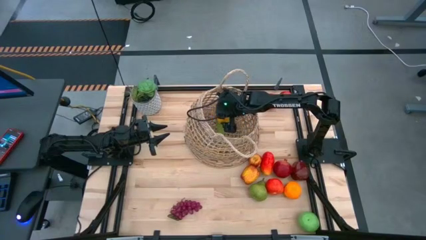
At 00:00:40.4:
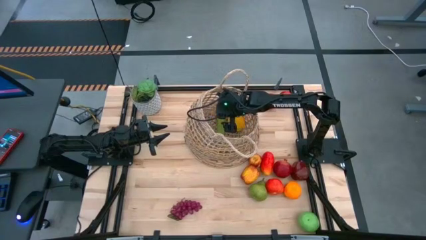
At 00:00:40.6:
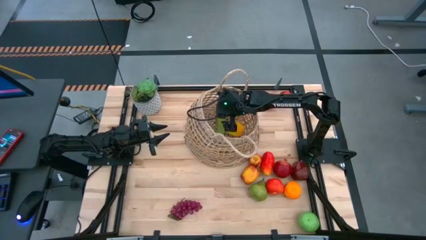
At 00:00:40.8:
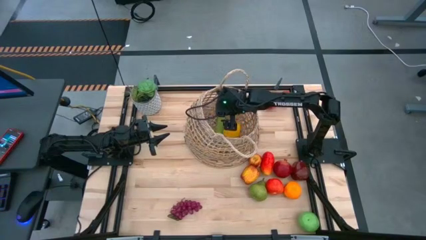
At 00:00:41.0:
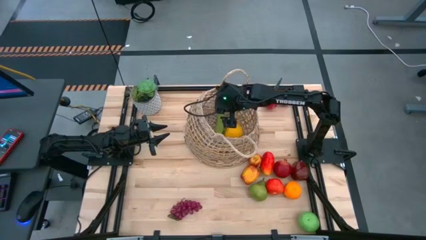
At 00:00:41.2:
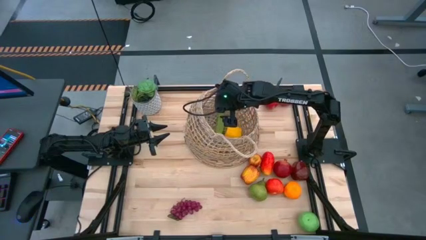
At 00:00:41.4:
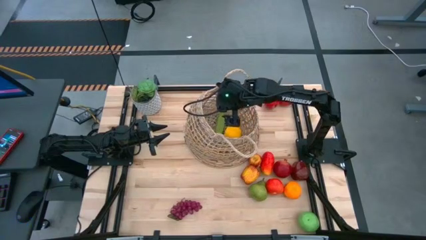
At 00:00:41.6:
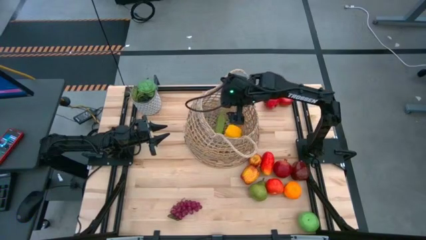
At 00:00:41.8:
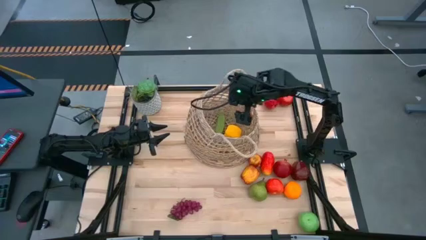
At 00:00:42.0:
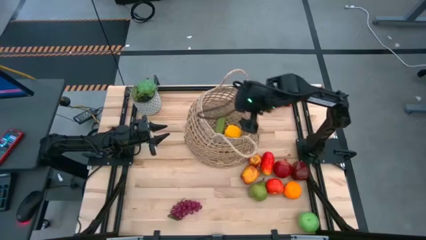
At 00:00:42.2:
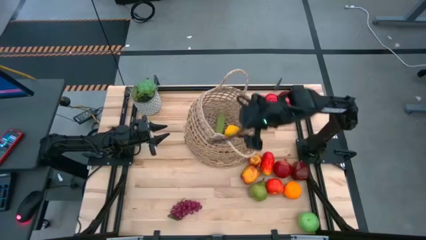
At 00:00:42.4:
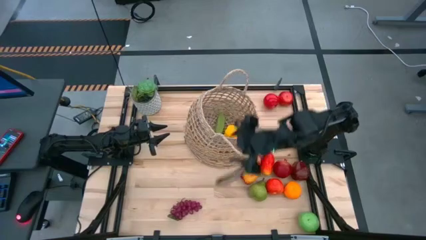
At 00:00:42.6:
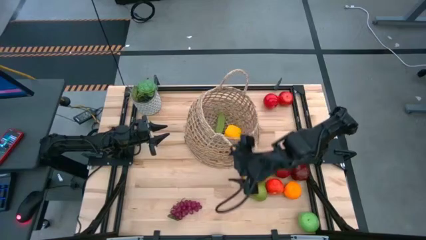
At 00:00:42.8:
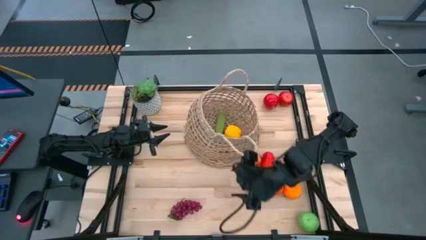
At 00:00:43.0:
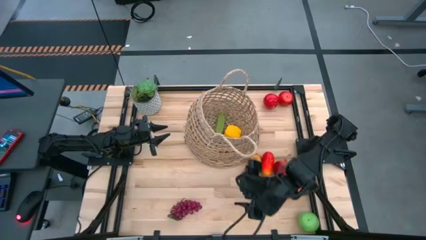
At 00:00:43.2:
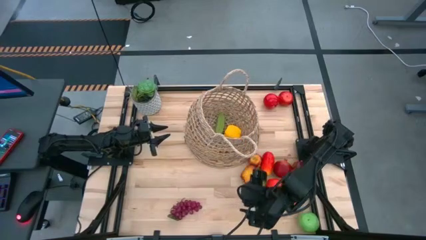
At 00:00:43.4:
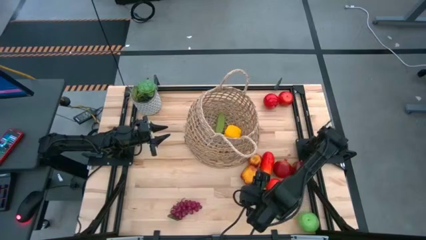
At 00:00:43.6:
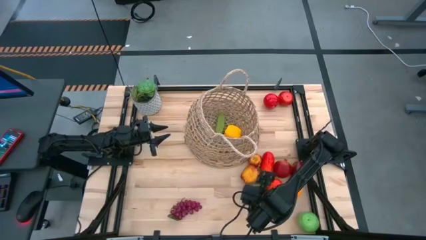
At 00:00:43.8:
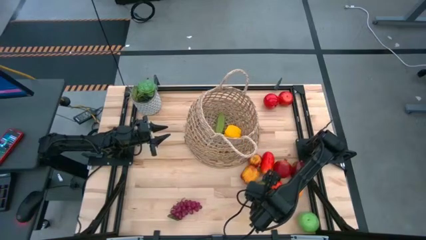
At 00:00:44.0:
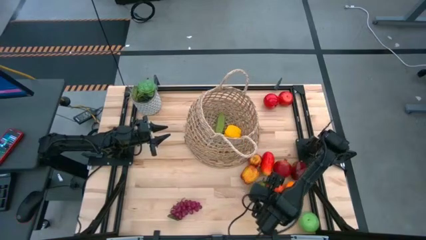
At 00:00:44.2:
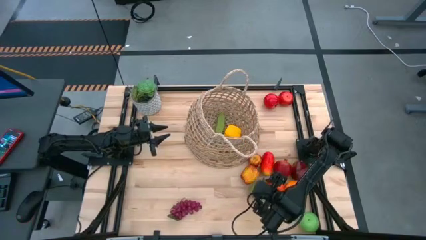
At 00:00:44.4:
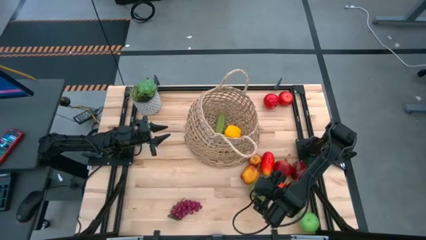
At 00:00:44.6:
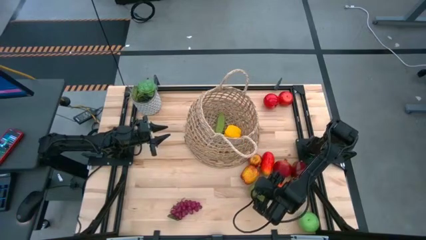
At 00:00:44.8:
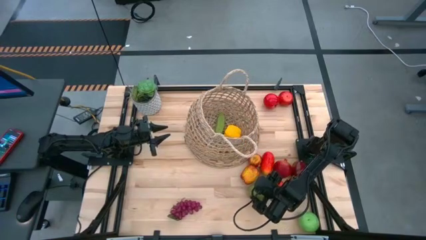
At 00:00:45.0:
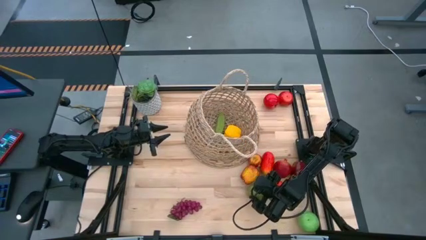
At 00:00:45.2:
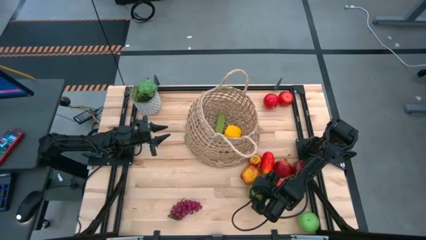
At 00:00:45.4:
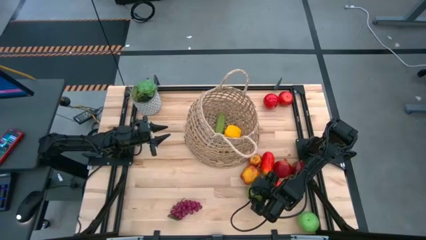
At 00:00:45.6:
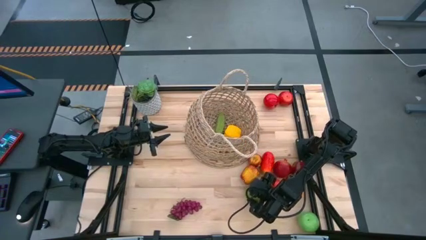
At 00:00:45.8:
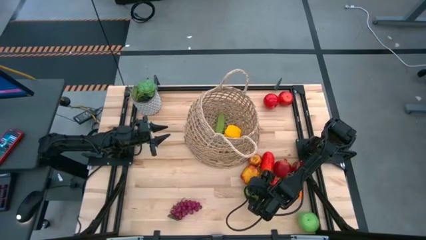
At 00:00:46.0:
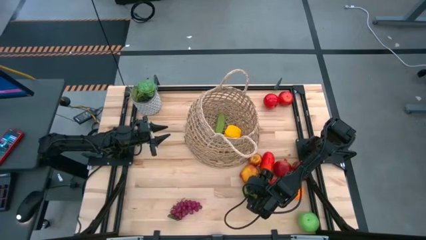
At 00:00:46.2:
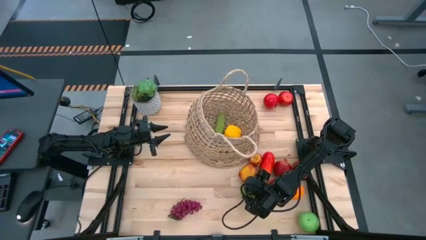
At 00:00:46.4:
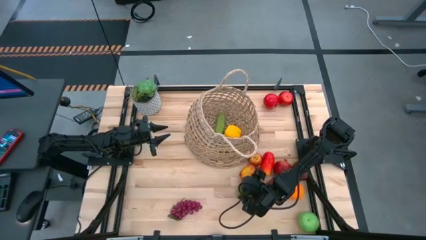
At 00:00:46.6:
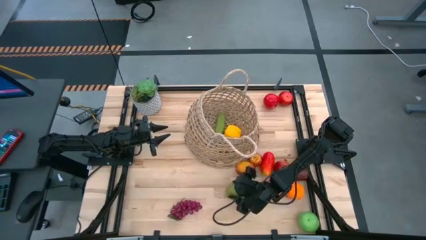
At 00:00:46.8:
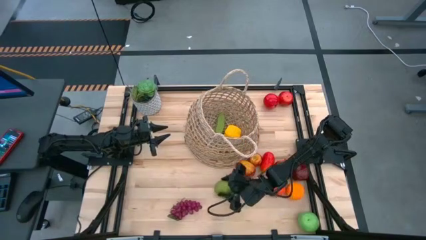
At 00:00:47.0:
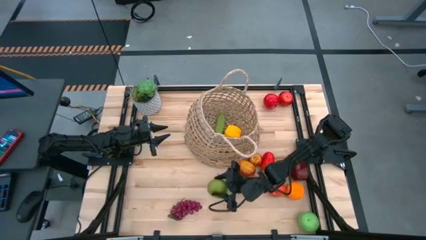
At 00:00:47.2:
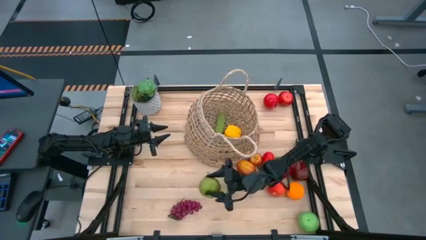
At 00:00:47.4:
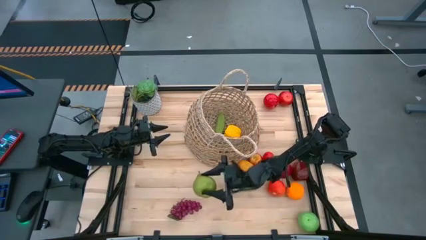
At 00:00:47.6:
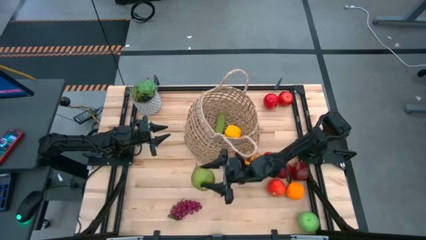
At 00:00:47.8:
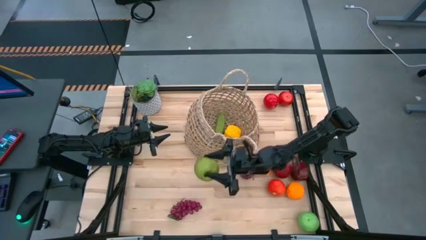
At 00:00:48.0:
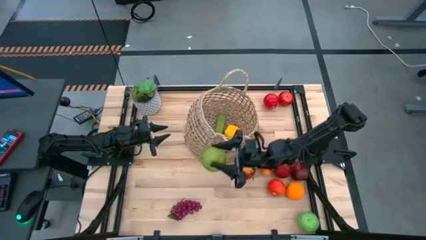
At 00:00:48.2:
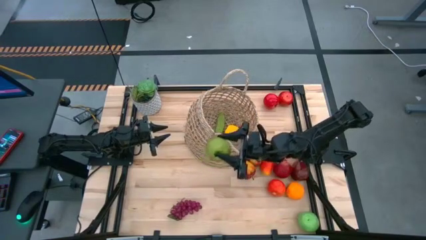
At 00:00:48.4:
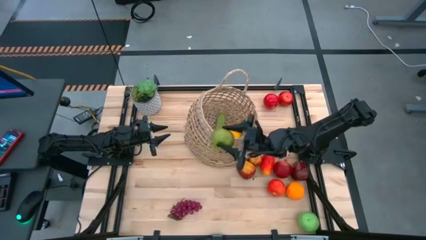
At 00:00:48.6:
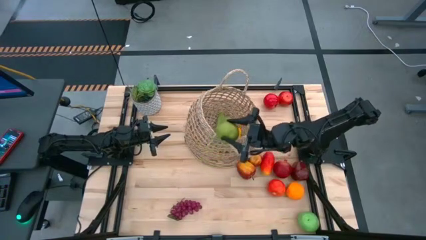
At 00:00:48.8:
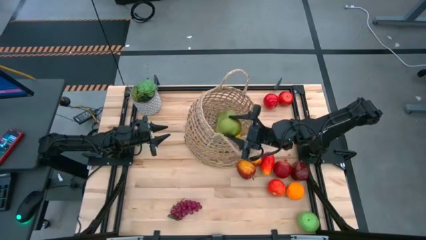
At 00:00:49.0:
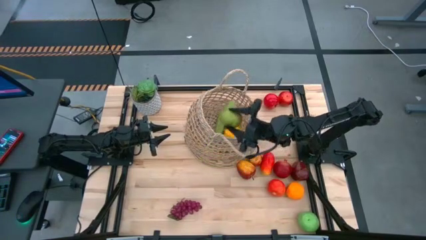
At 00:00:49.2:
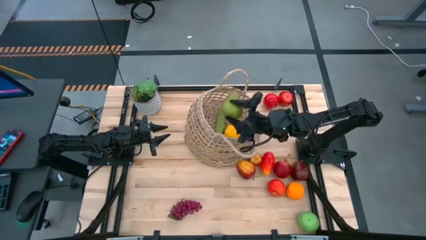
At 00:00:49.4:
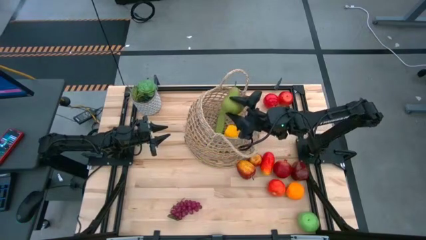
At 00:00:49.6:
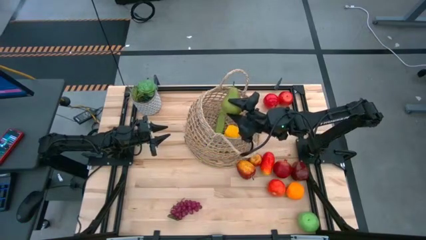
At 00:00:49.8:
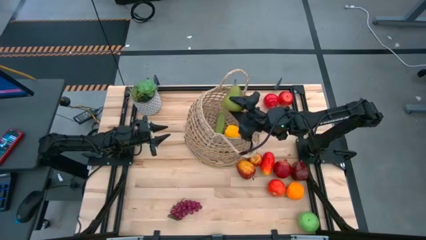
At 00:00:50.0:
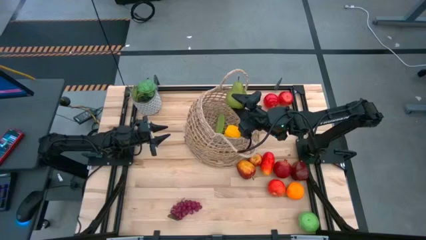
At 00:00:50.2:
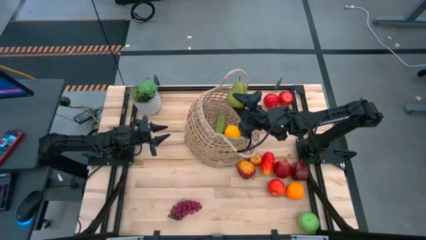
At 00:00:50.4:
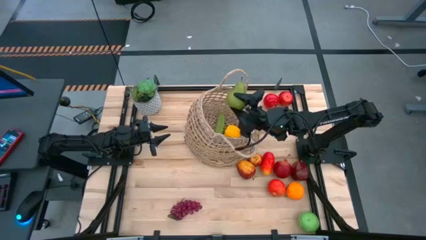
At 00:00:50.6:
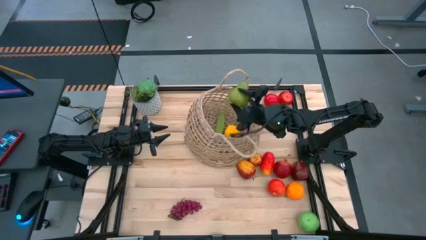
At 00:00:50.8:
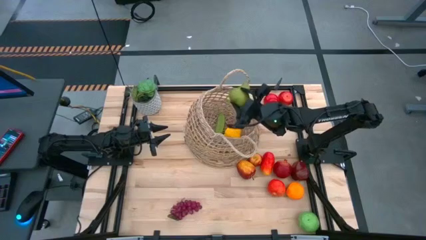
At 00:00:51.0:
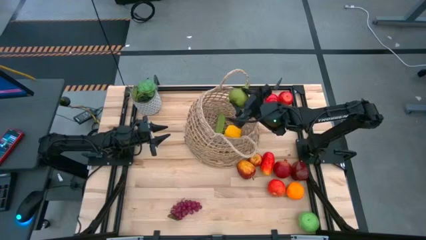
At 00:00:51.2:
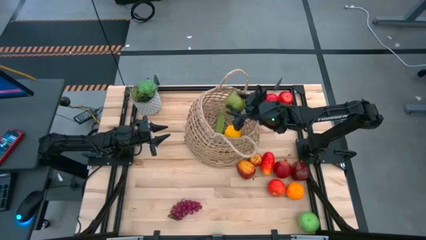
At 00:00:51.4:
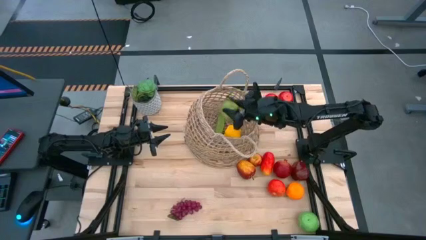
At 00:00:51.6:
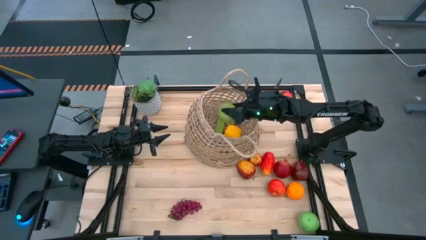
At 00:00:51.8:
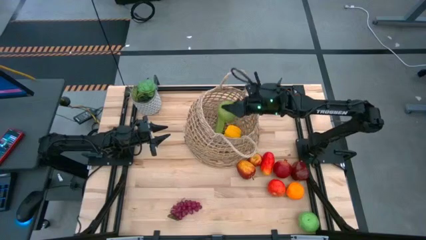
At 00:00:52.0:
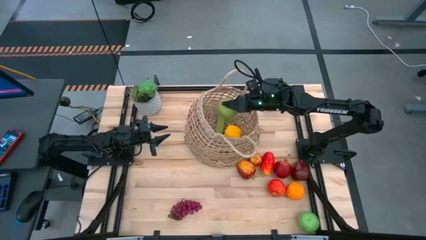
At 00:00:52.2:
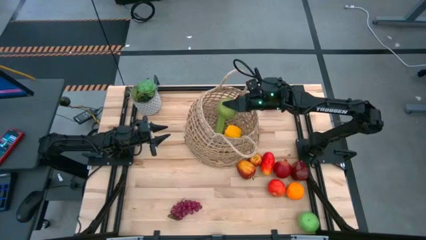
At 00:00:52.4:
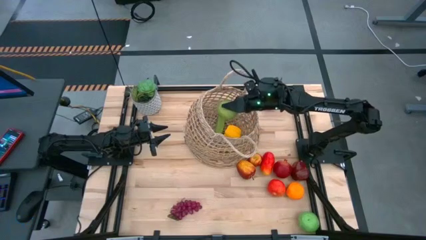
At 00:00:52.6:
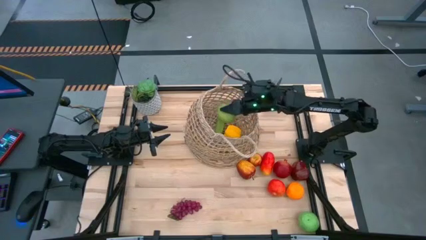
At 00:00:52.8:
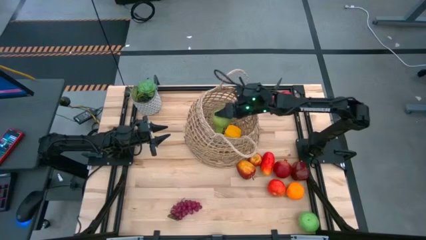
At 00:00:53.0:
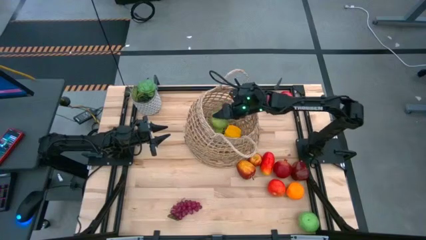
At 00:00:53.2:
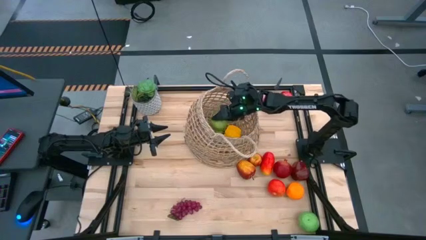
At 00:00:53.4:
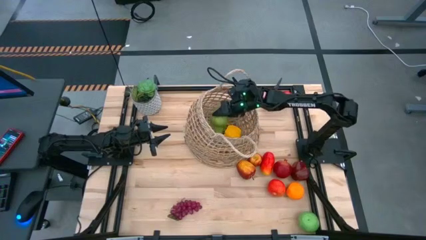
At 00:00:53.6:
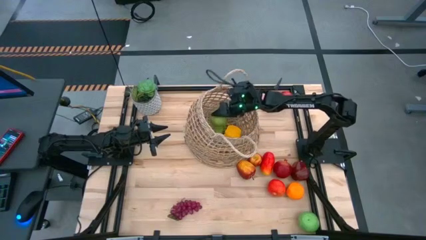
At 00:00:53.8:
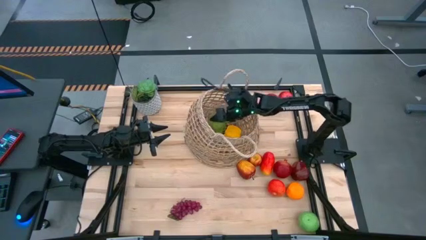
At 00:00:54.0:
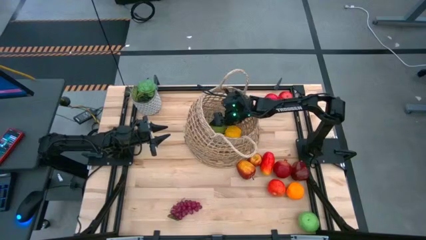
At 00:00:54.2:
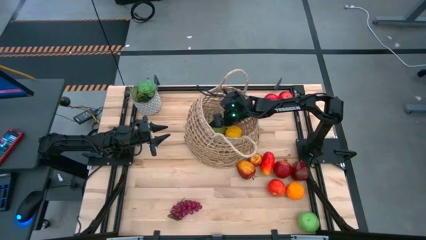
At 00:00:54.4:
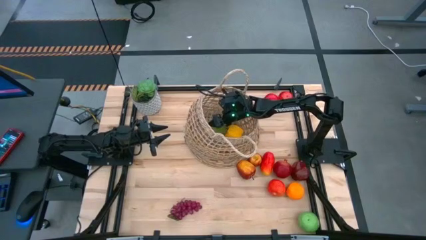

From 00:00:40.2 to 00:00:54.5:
Task: Build produce basket
Put the green pear into the brown basket
